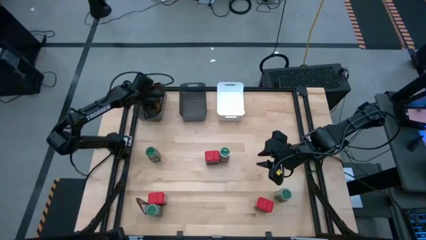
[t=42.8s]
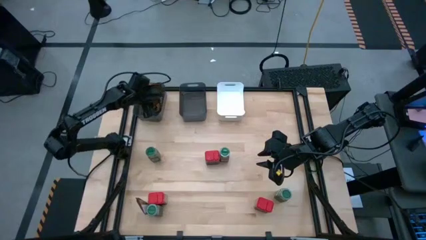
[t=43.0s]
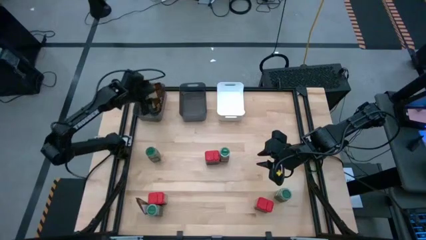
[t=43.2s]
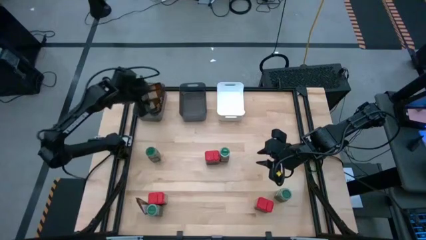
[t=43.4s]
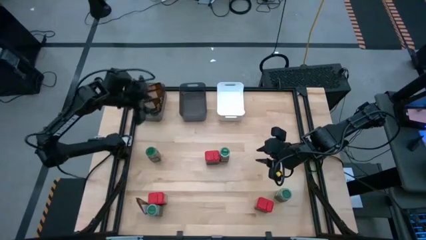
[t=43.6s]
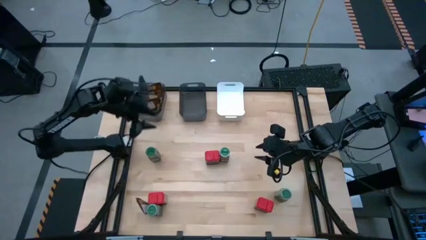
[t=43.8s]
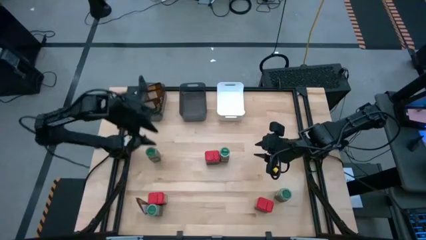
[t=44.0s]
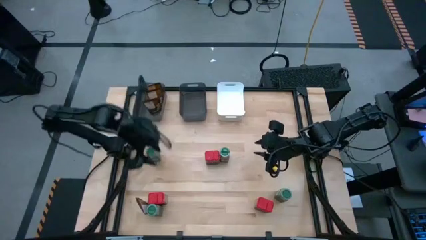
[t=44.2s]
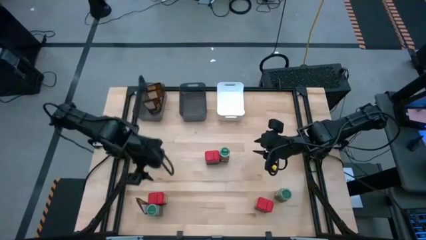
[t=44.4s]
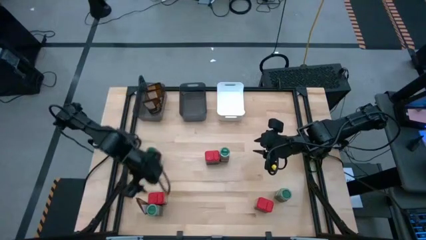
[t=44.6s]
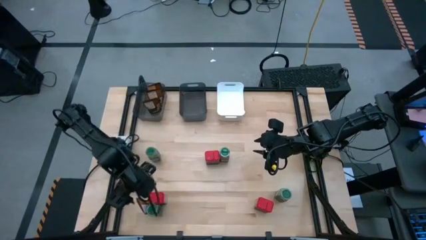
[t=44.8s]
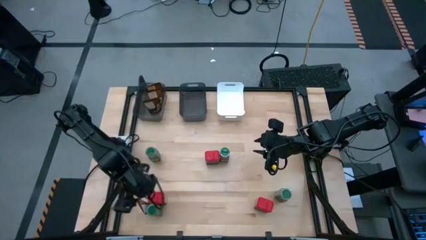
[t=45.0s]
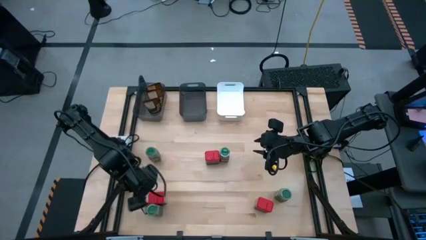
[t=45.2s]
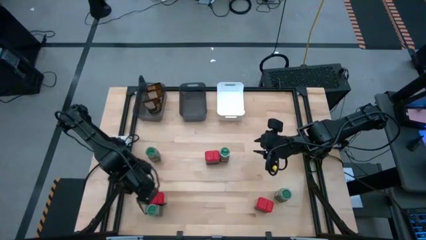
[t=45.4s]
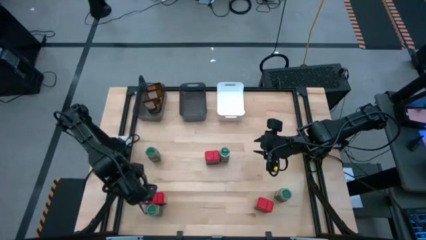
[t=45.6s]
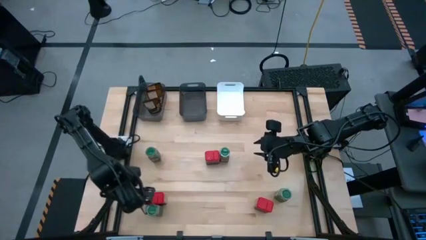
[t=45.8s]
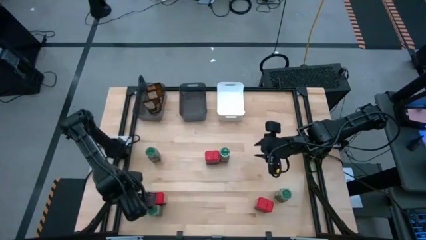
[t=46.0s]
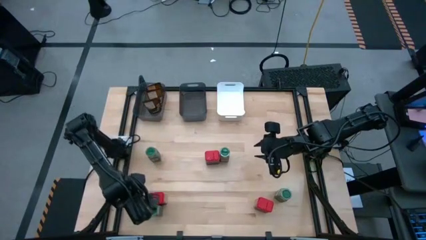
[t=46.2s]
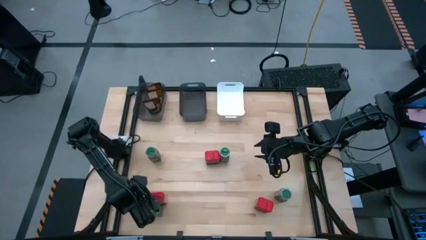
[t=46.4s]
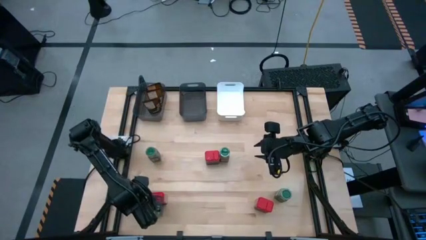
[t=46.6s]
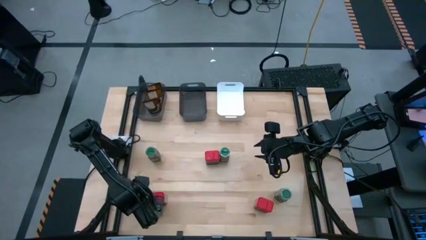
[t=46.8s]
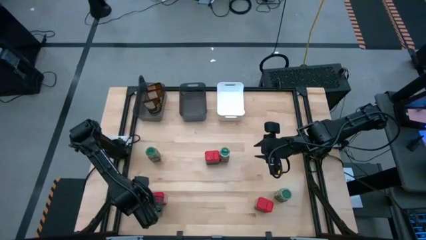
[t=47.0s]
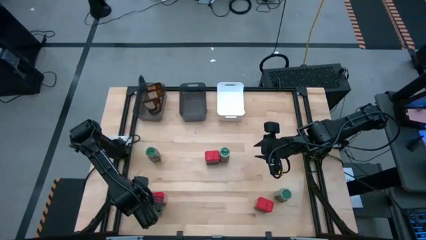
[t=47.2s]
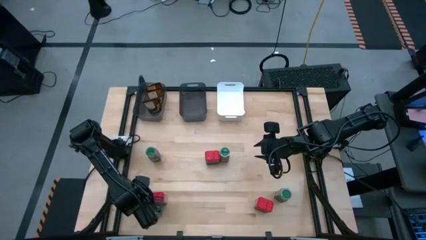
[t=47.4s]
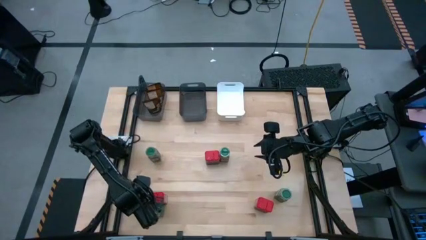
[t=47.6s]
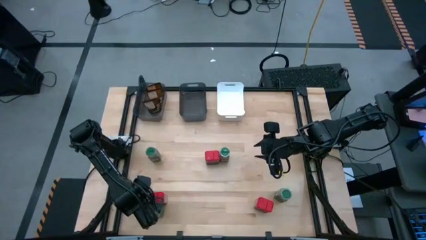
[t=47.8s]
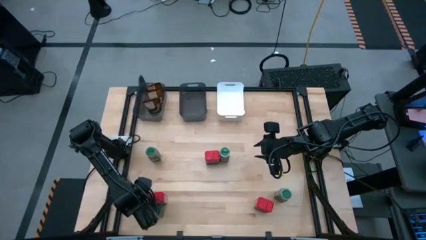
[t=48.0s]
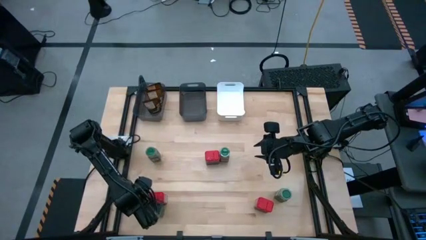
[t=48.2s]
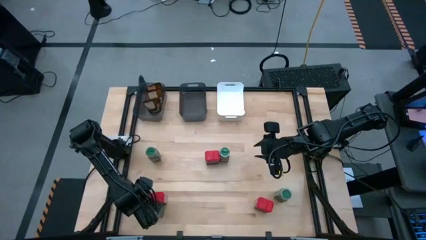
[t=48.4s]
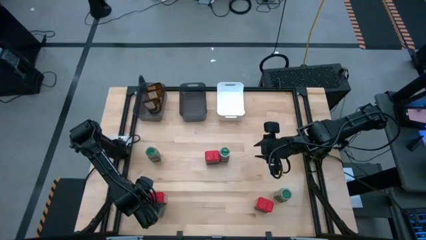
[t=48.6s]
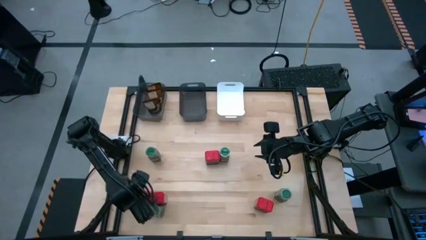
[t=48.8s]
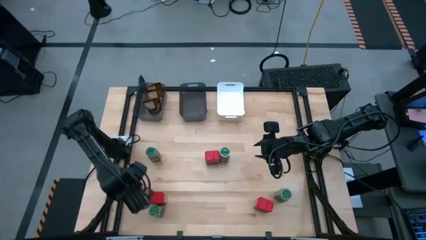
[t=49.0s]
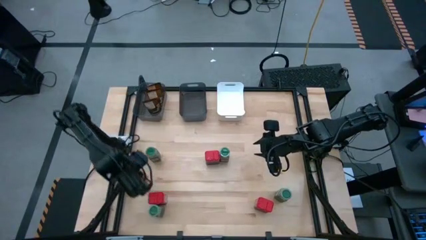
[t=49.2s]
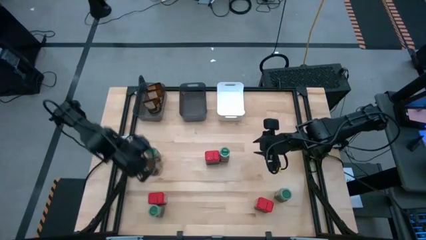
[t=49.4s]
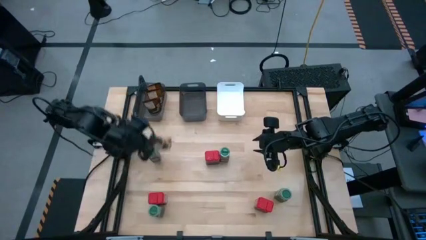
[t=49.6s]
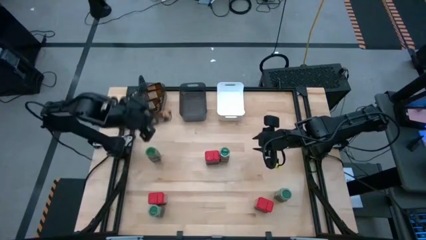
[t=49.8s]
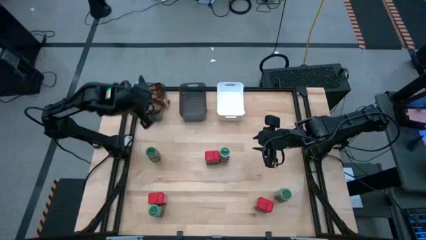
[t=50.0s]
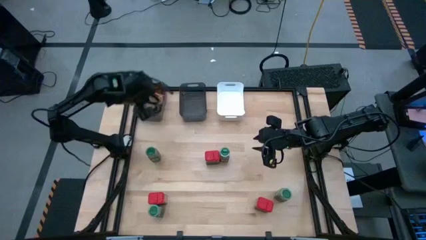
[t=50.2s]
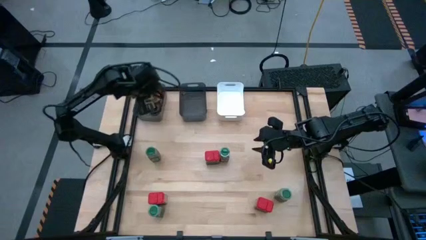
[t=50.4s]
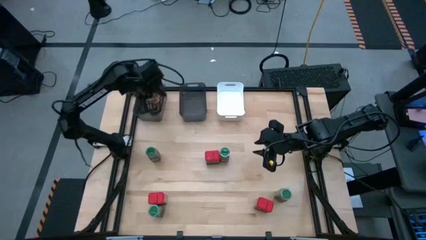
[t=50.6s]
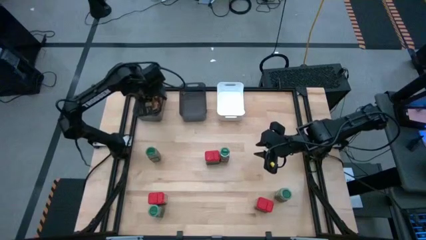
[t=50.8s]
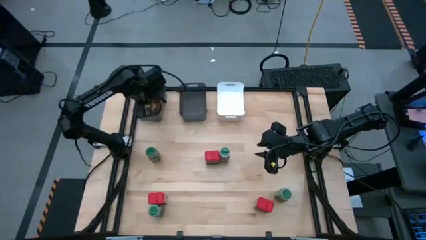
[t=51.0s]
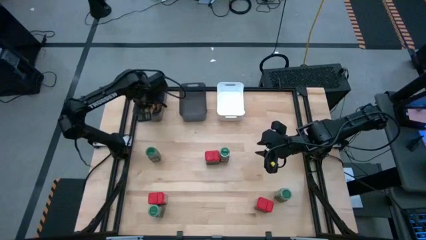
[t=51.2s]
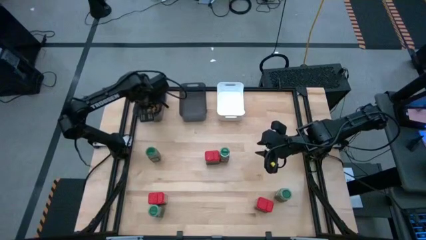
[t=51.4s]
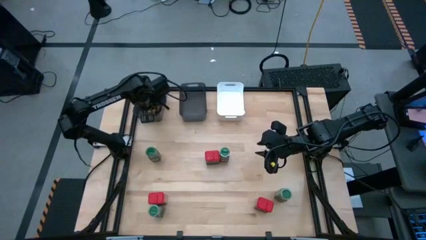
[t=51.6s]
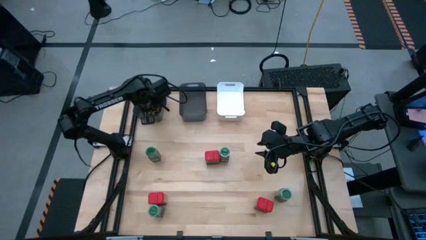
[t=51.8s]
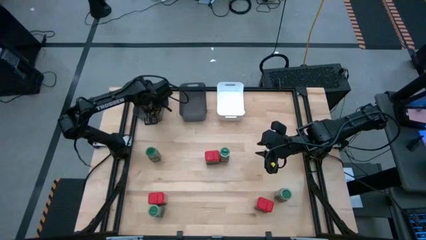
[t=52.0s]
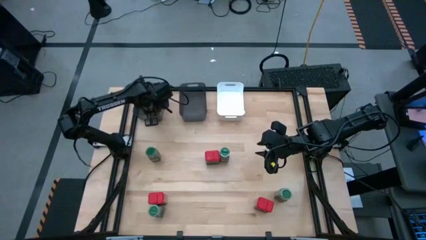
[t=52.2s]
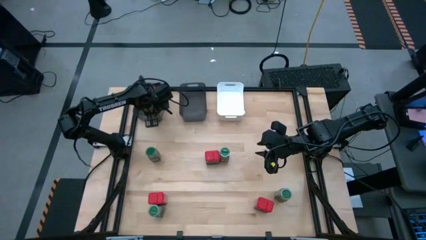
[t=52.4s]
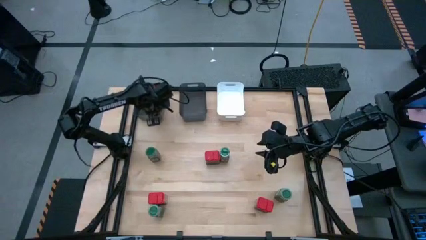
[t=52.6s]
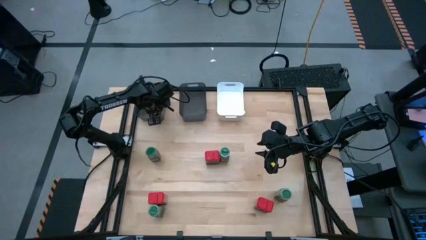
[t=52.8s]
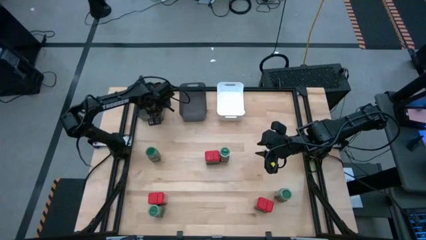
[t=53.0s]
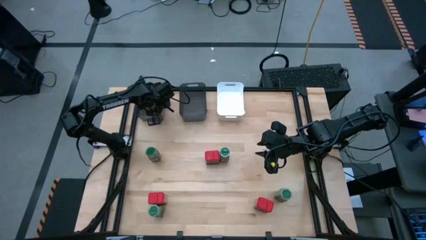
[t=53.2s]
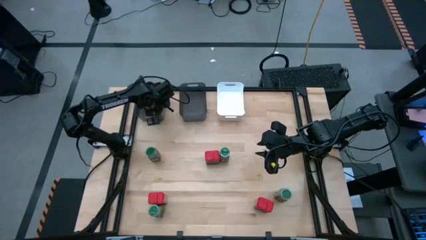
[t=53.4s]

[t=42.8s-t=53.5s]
Task: Sort spices by type
Put the brown seasoning sachet into the left black bin

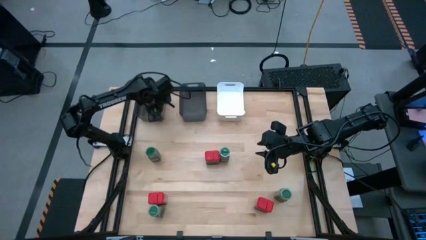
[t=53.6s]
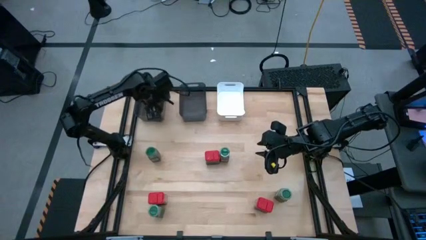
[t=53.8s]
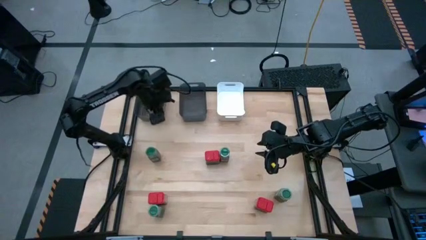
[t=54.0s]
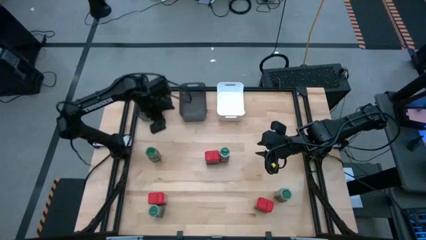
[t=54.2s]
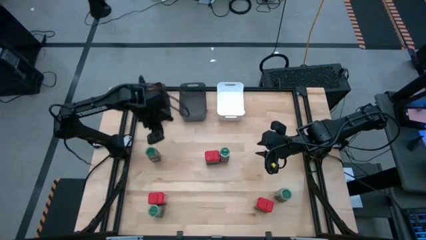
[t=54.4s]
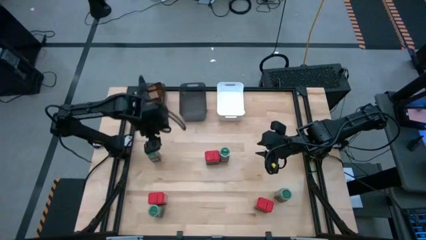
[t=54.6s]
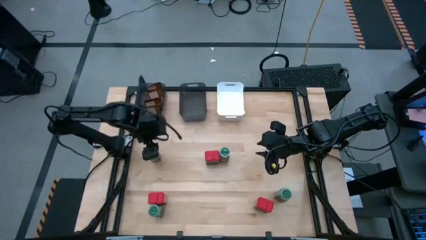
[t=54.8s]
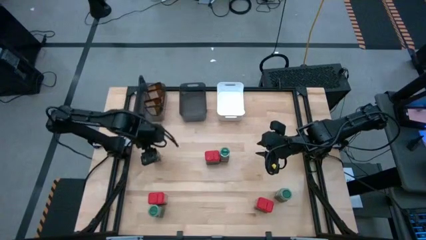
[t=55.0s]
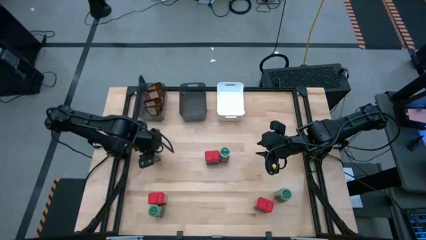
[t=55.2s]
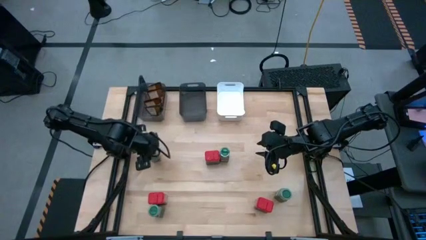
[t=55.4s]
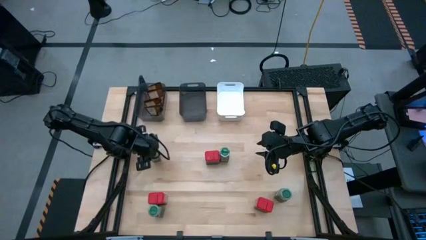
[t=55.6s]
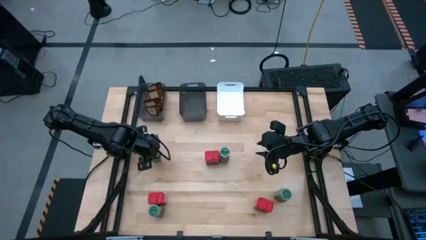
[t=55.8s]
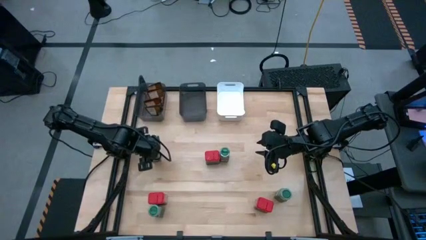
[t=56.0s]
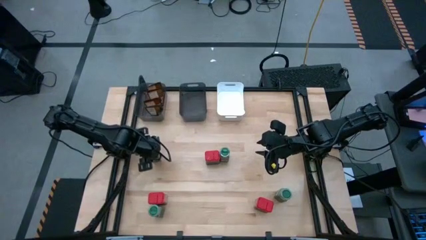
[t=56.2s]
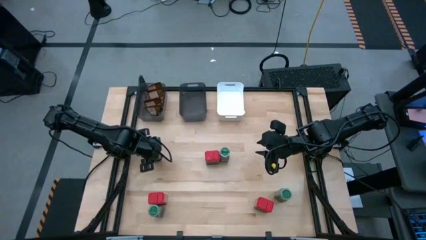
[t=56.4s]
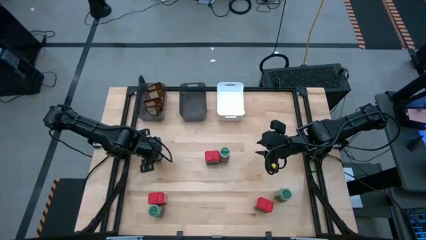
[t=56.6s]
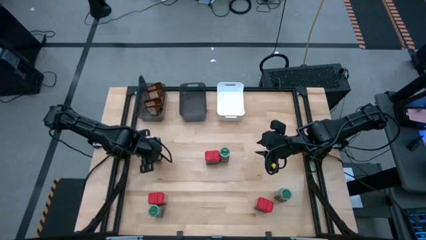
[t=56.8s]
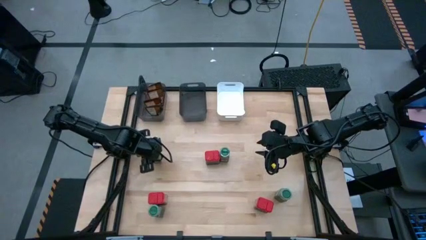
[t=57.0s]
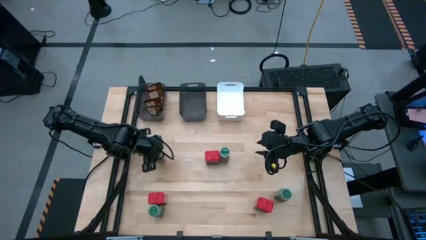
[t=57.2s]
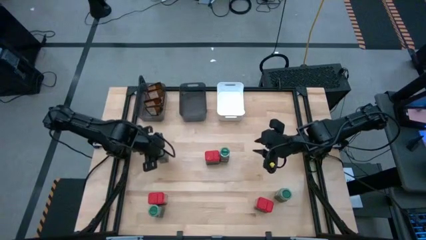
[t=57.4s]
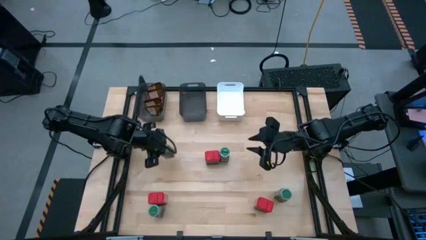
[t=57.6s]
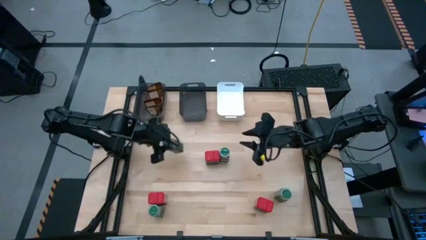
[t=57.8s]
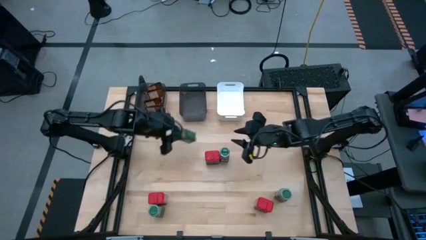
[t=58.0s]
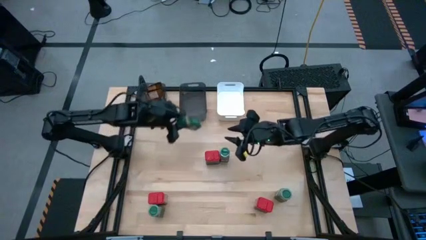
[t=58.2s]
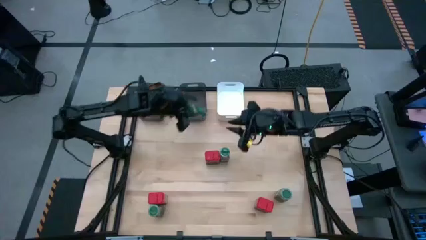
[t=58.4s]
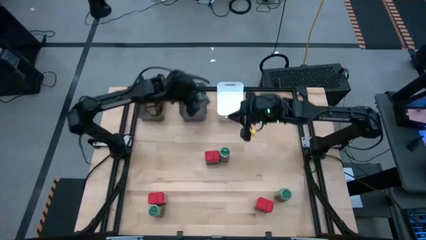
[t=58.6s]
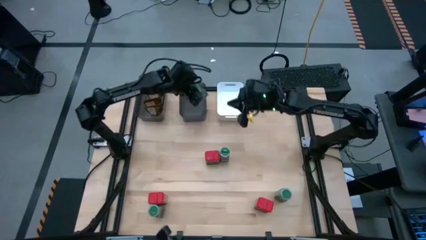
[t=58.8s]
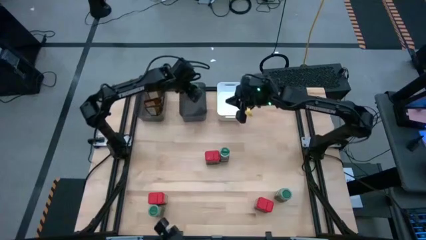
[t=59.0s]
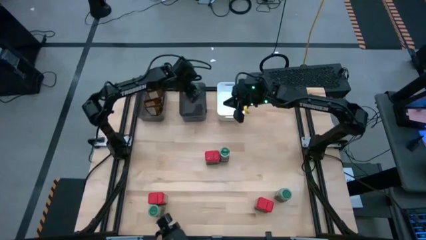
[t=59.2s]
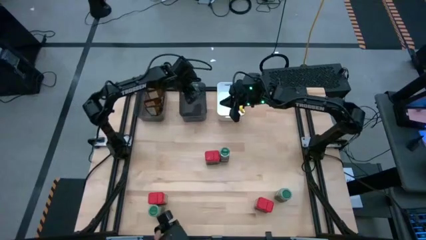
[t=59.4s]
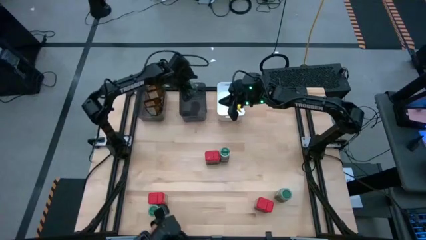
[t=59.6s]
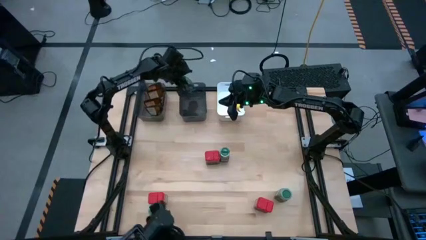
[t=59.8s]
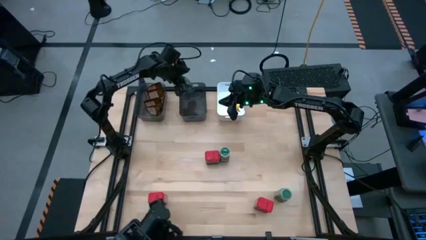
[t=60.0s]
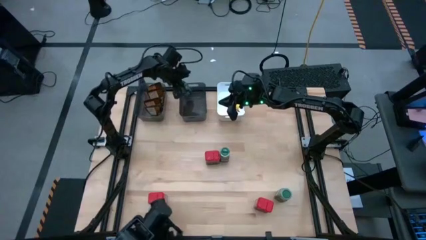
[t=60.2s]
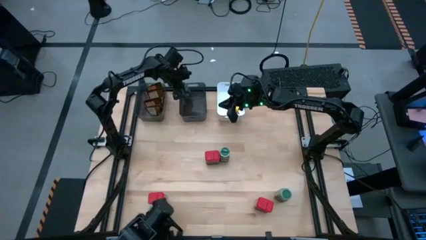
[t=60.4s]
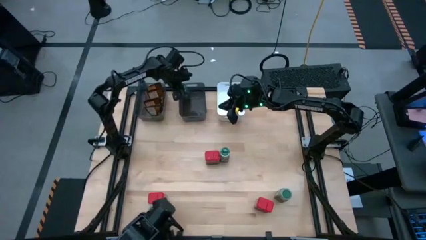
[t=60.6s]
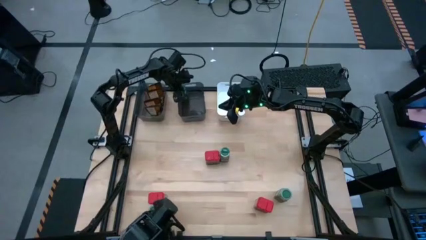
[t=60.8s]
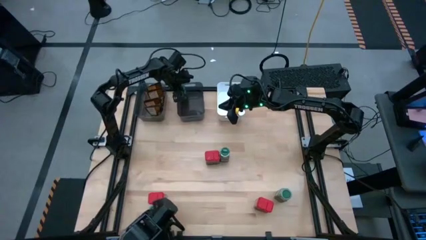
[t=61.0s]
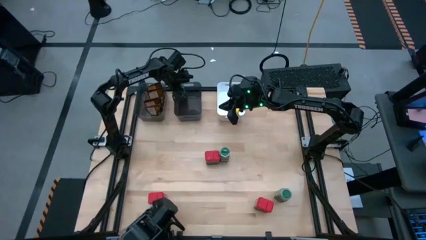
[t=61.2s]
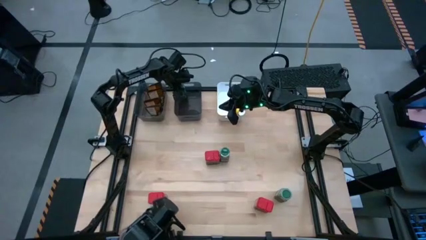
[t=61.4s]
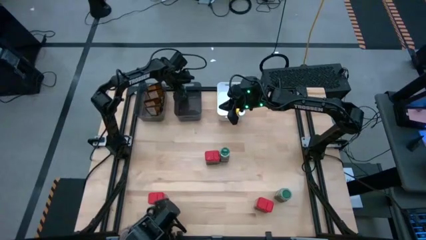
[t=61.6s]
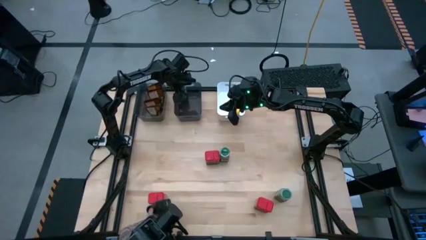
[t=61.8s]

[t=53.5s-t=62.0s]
Put the top left green seasoning bottle into the right black bin
